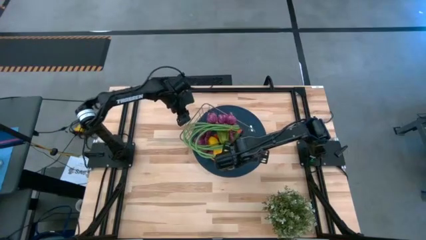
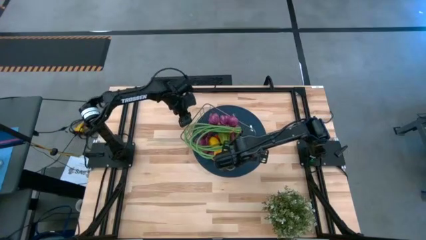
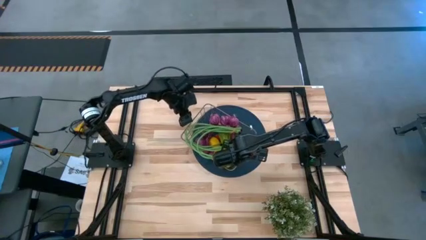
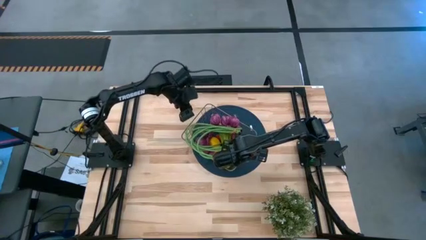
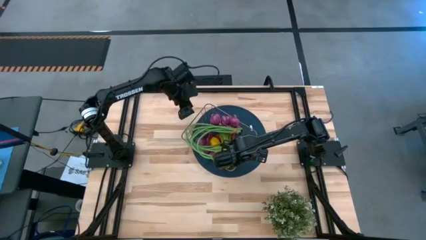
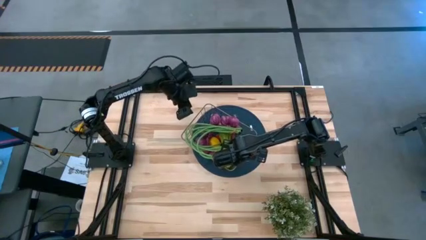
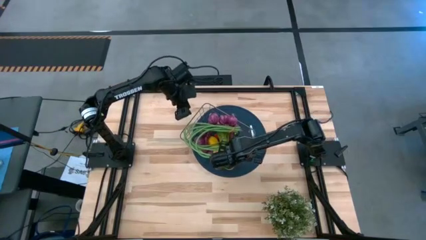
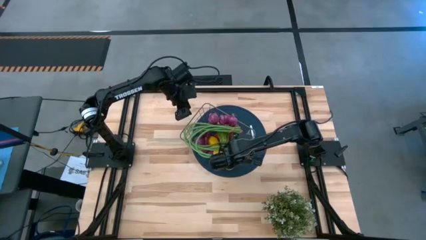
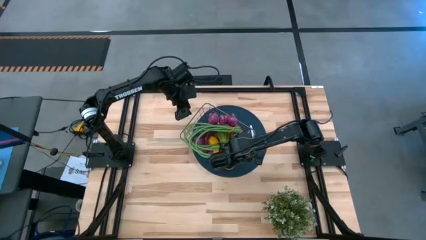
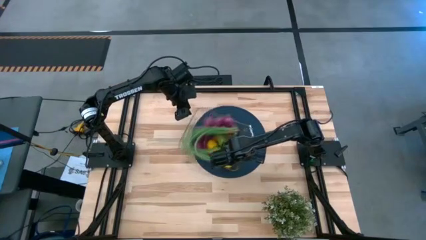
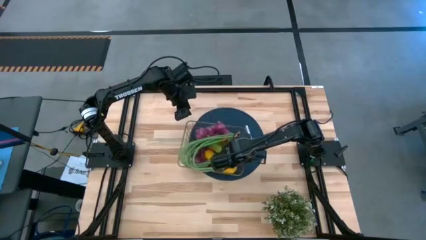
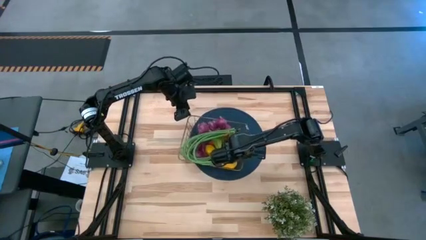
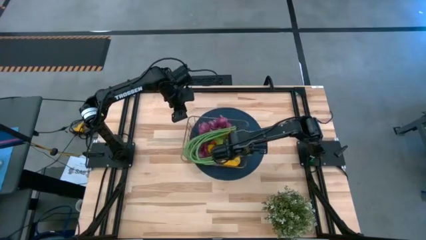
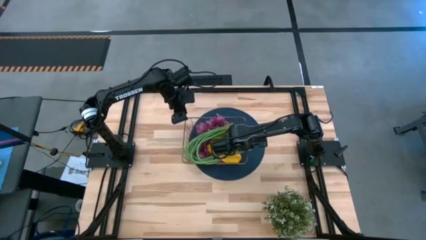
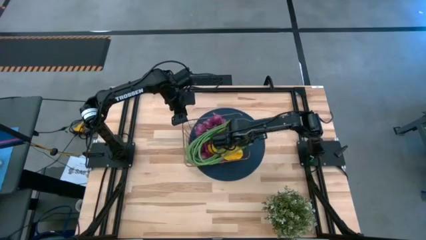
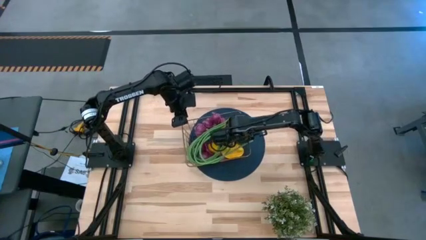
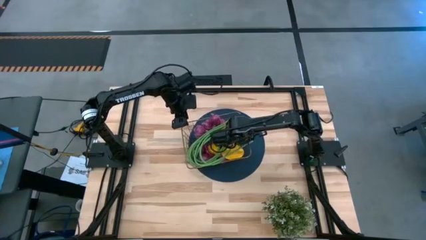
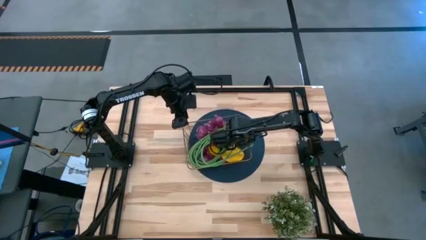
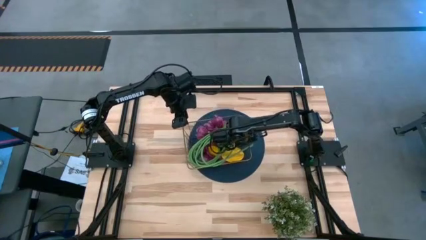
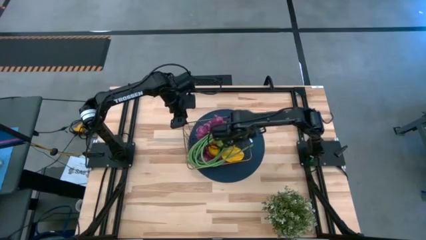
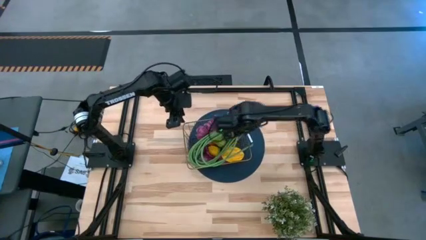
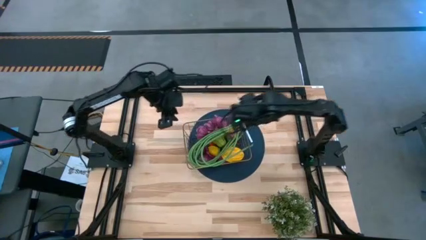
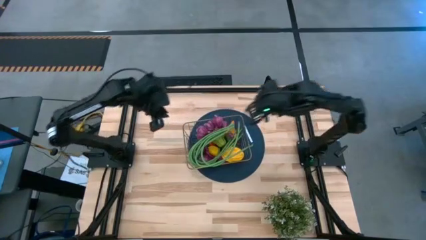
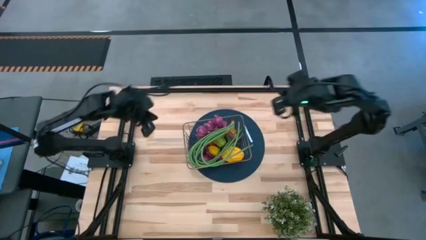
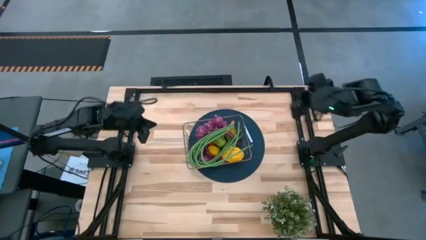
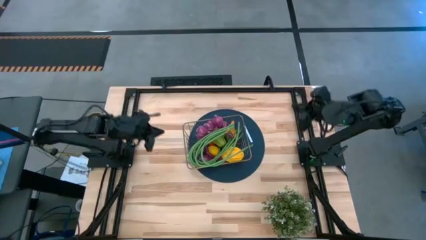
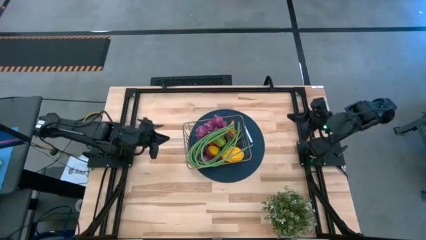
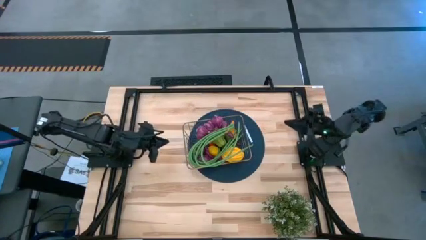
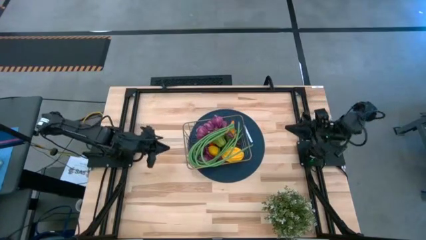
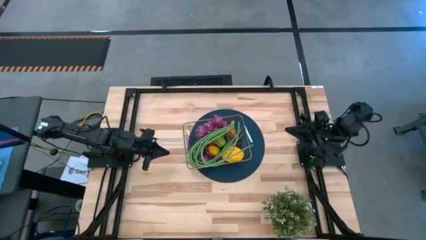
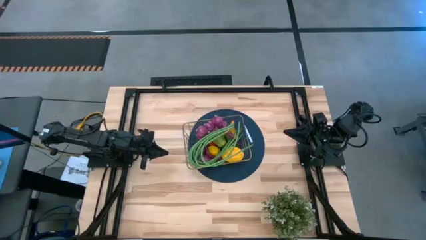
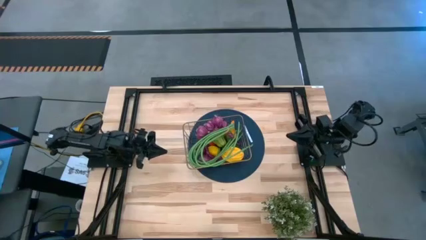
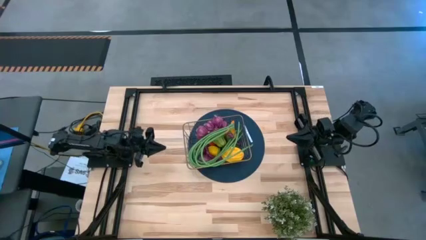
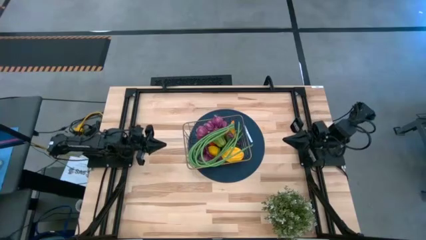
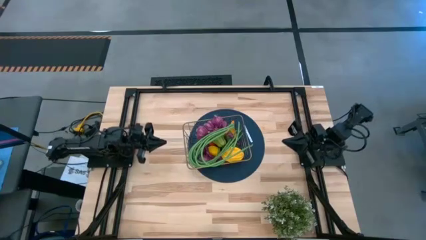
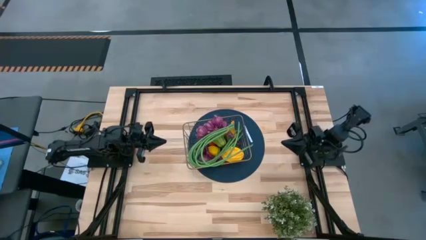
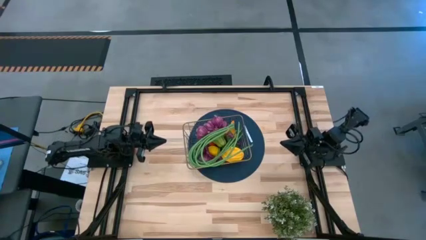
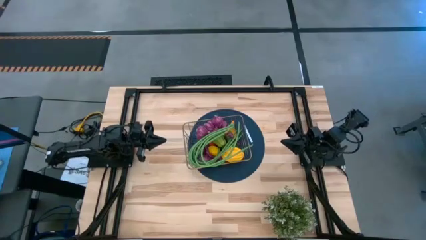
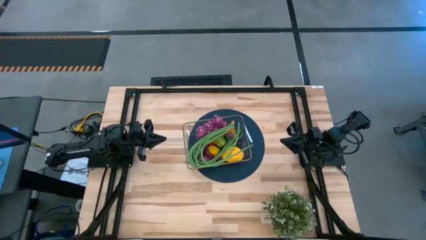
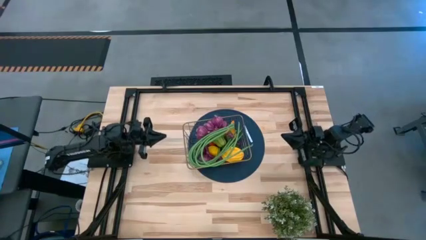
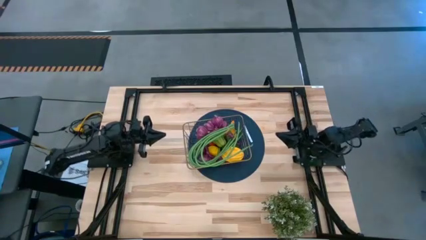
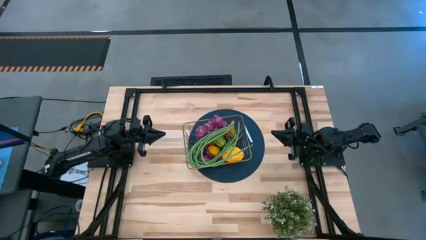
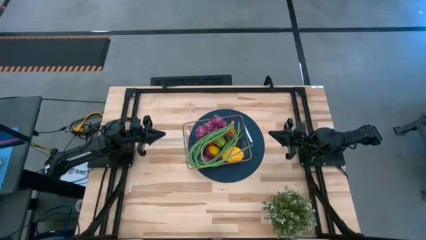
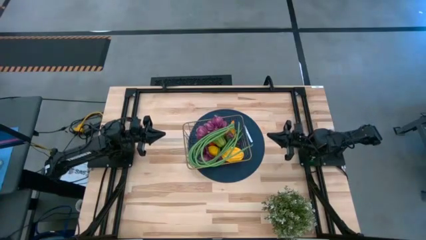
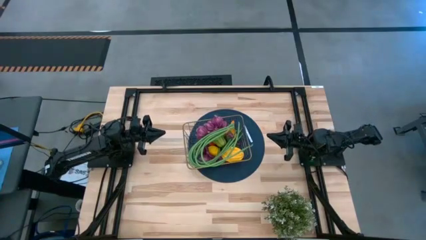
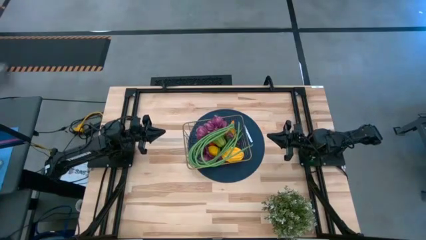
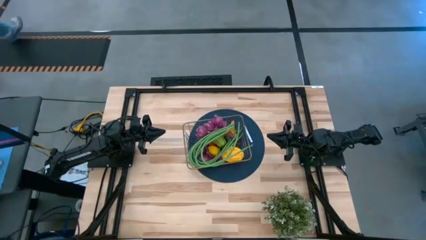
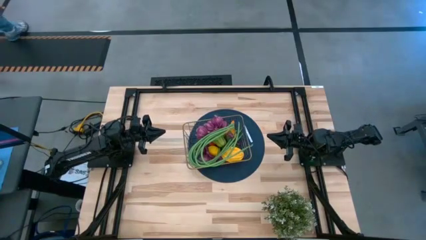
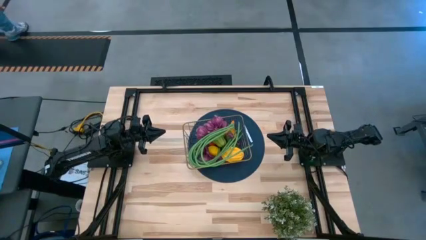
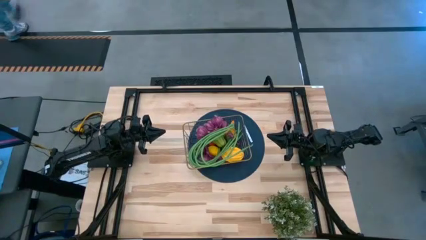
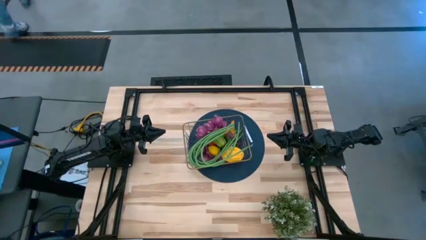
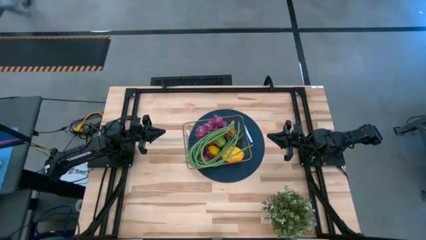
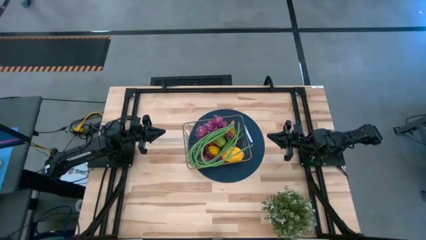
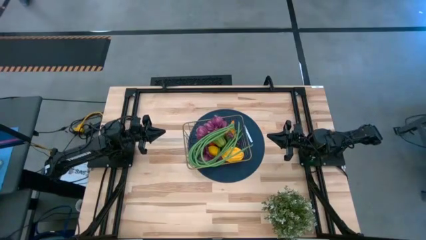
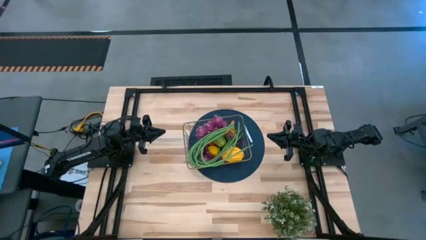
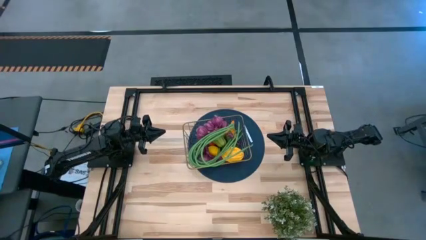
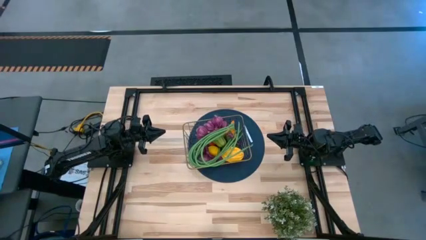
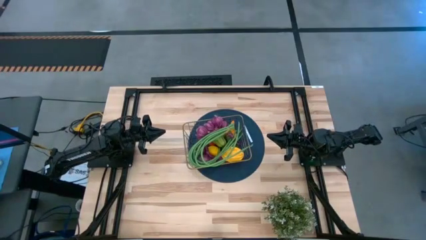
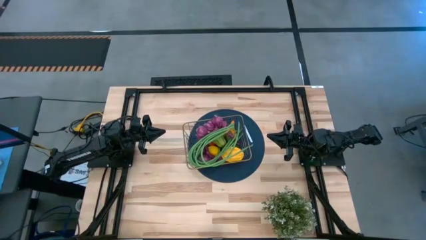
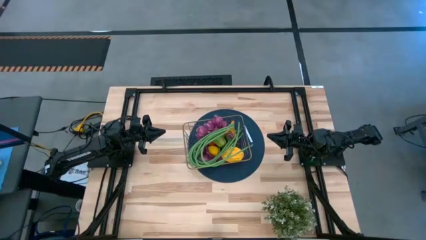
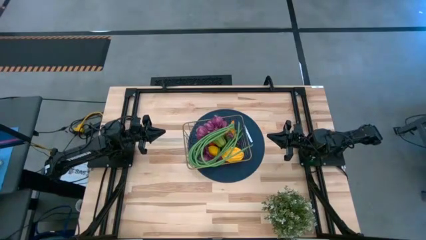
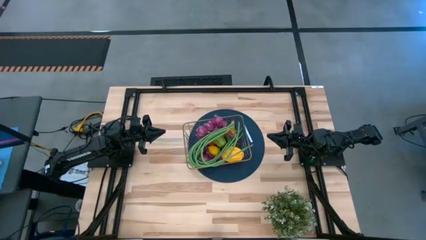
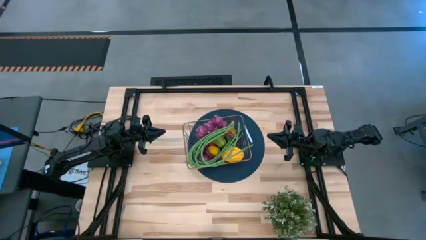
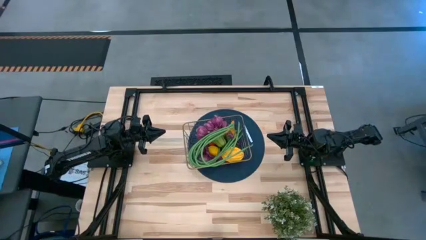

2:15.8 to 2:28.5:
Task: Build produce basket
Return to Home Position
